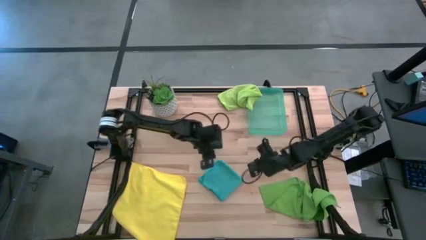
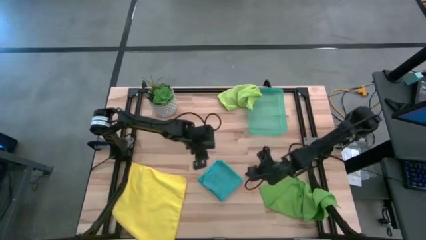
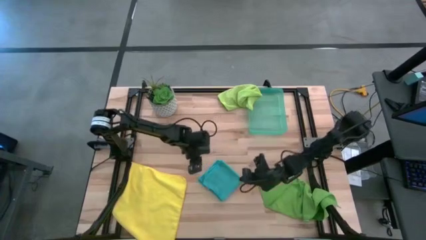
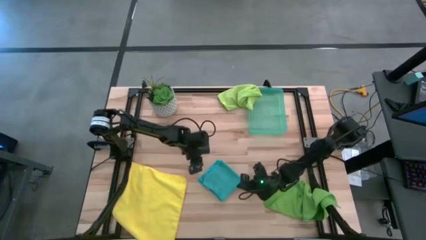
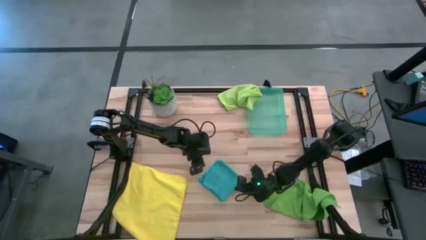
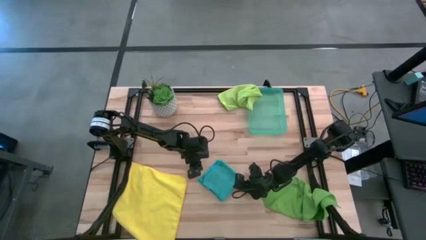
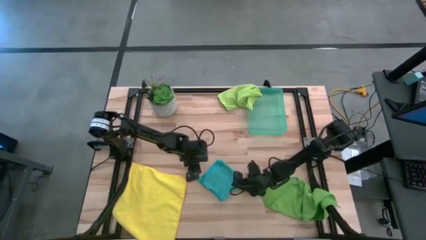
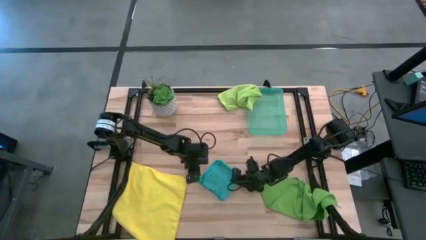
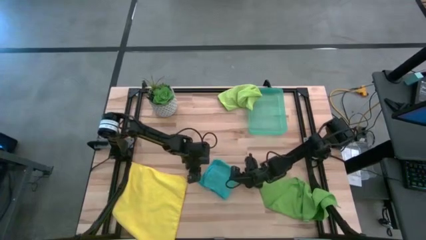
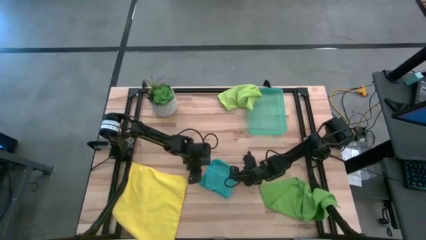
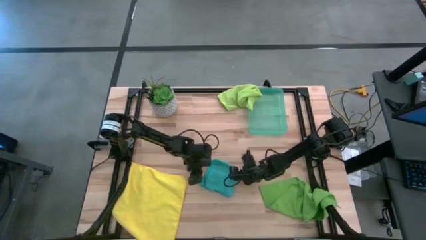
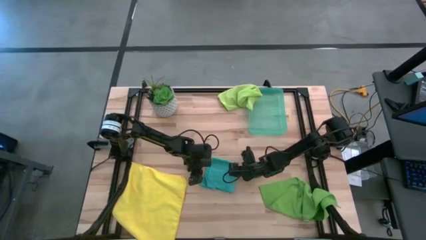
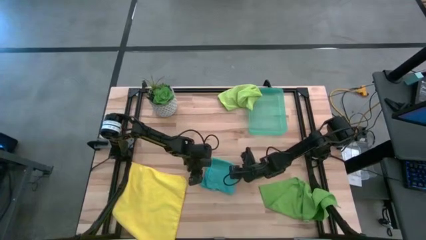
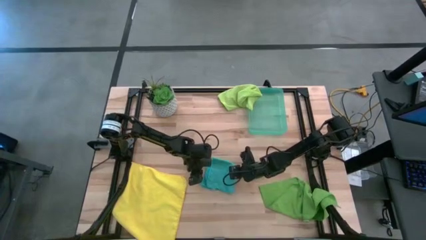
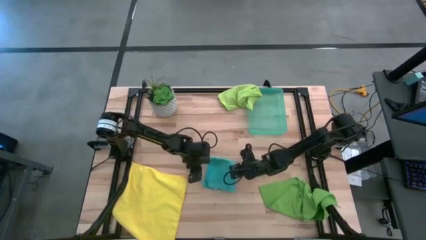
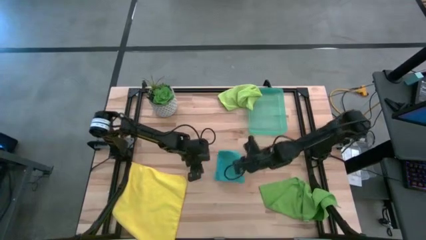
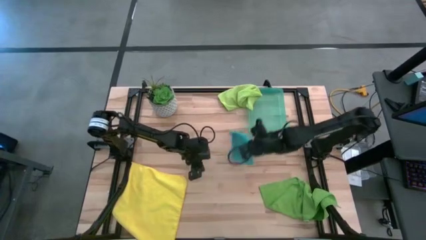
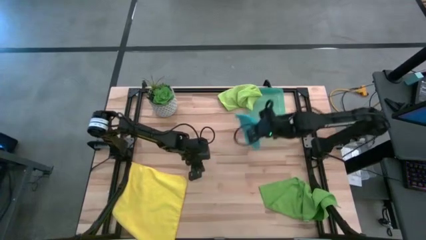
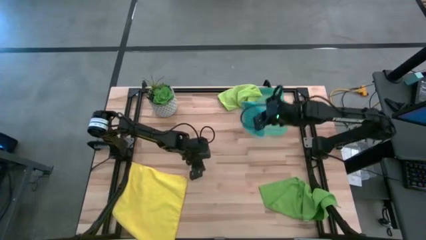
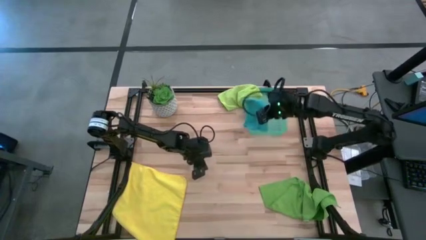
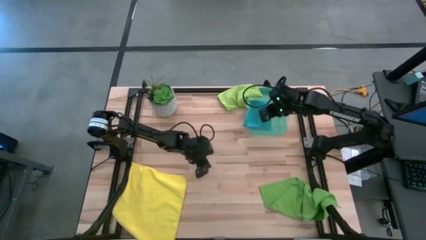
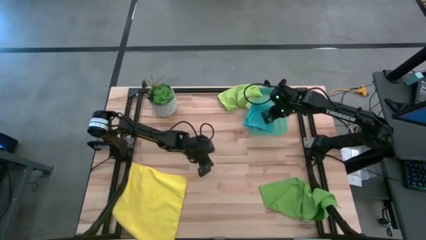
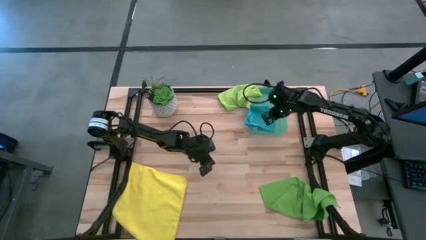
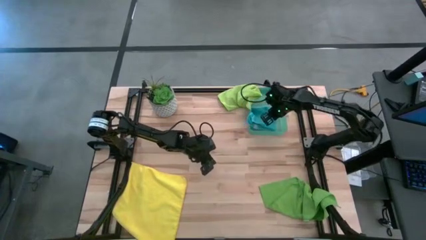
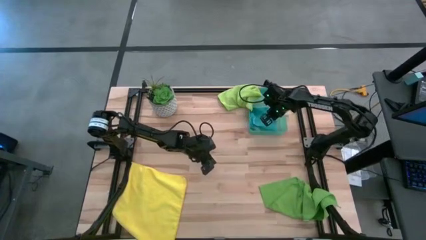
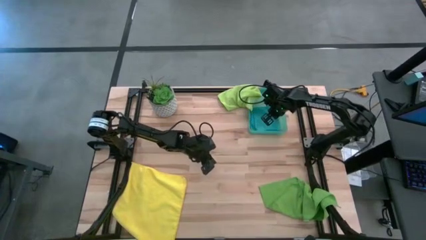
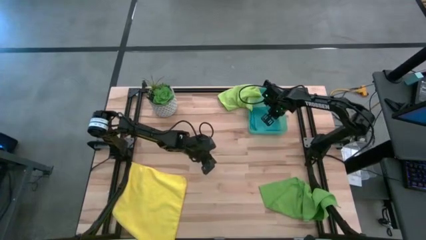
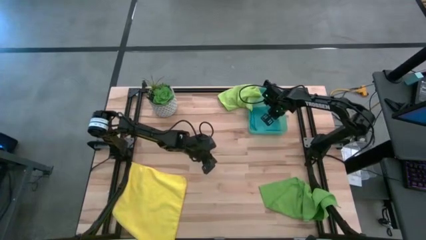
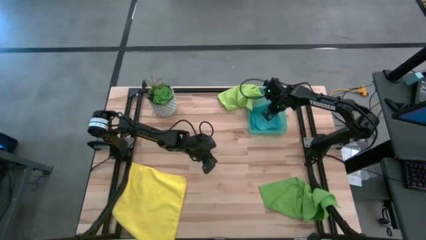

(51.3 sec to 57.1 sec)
Task: Fold microfiber towels
Put the blue towel into the container

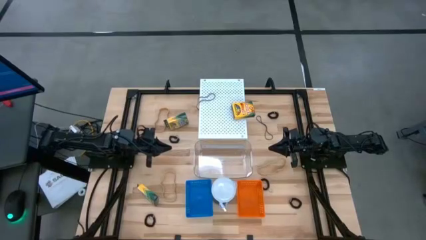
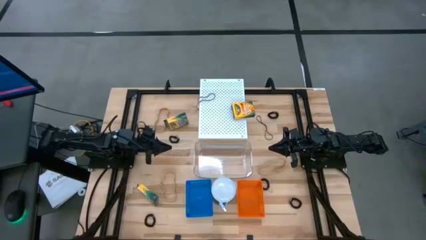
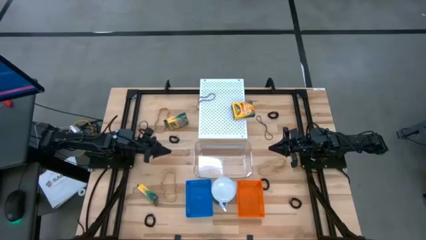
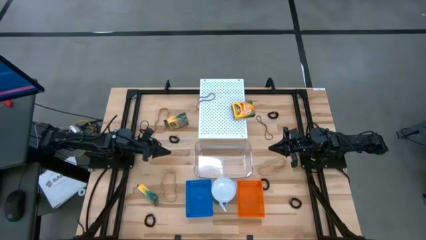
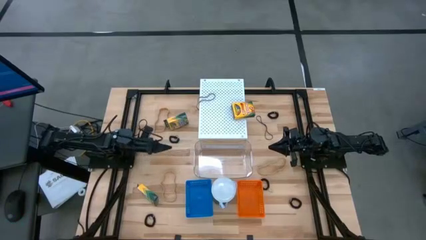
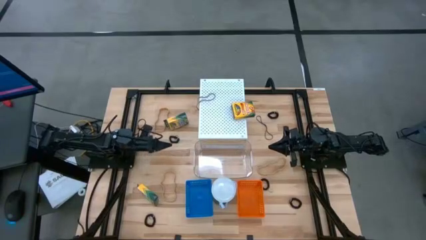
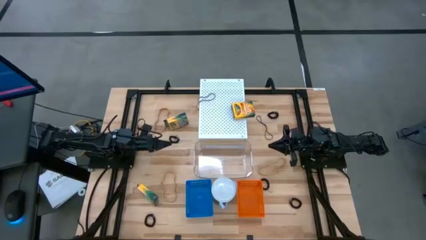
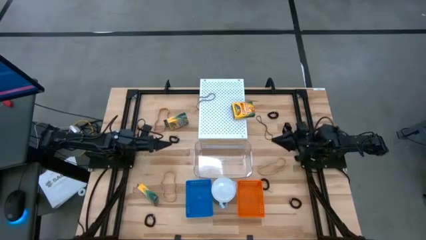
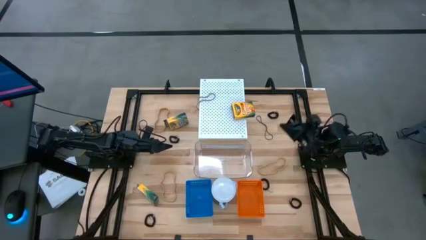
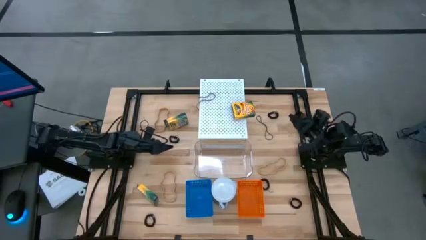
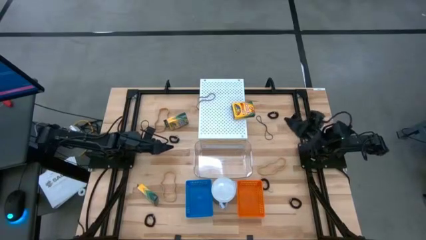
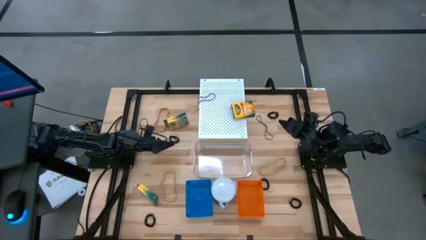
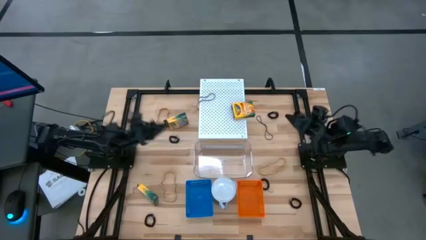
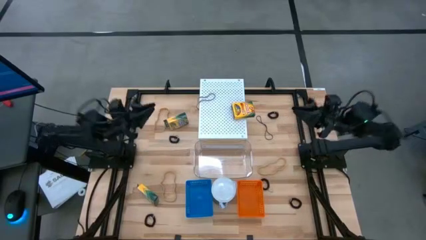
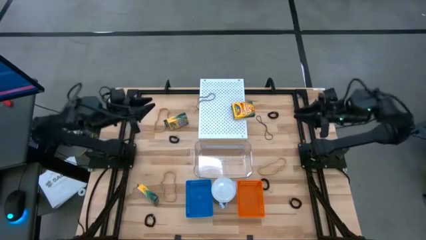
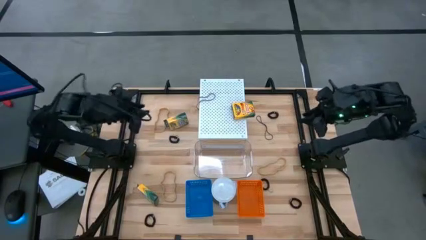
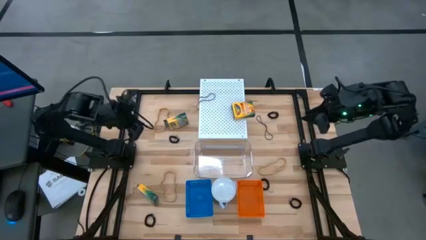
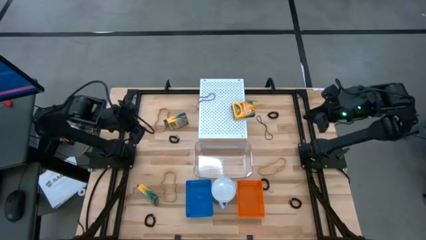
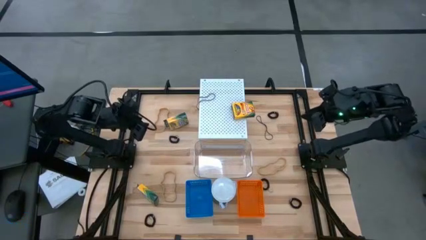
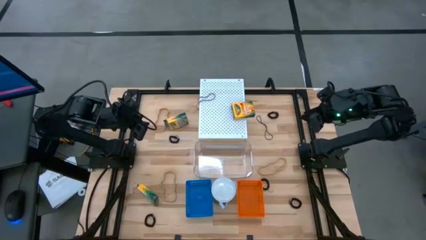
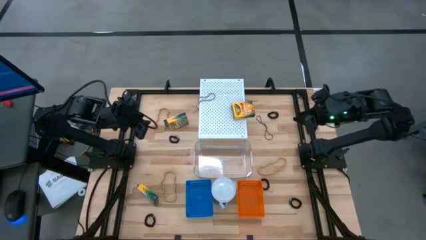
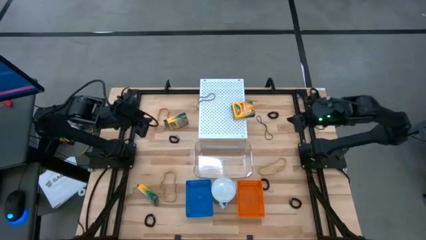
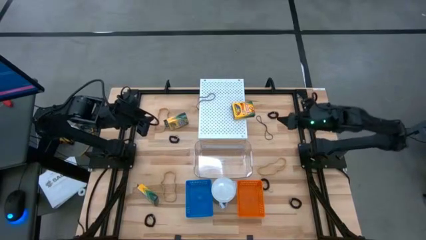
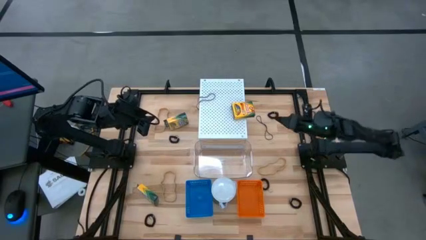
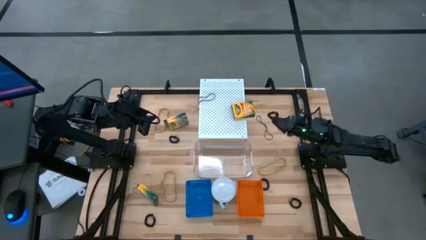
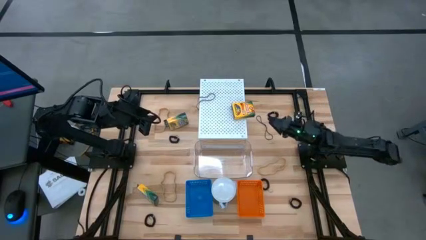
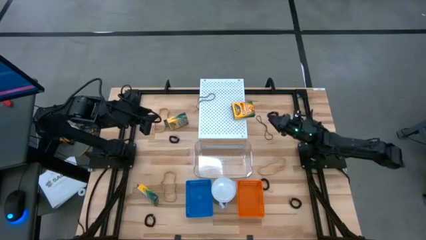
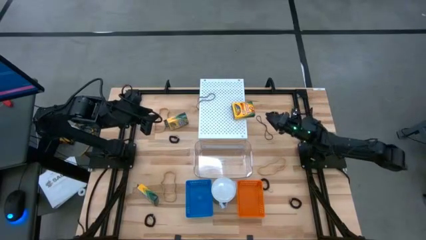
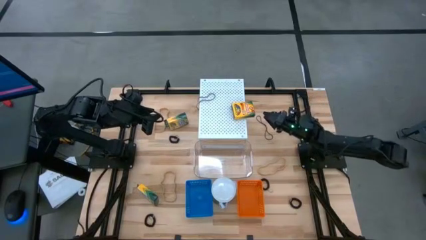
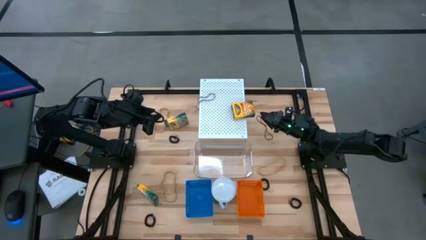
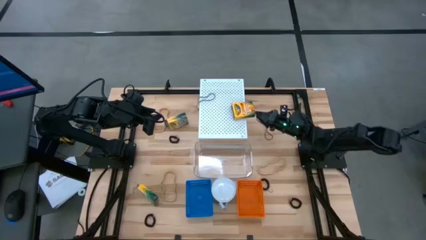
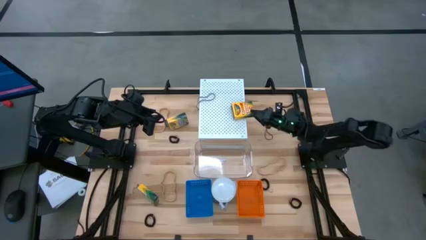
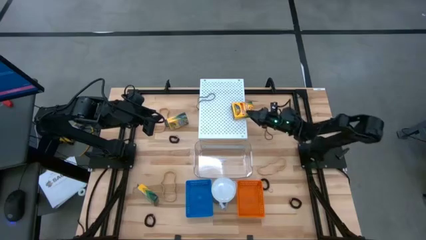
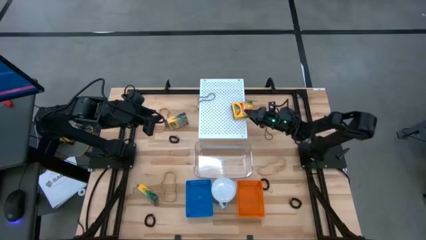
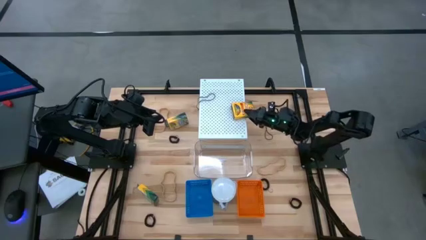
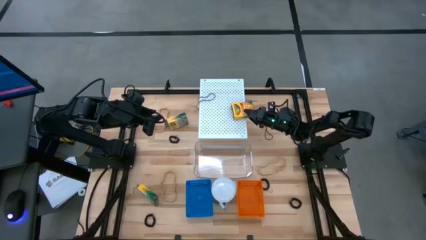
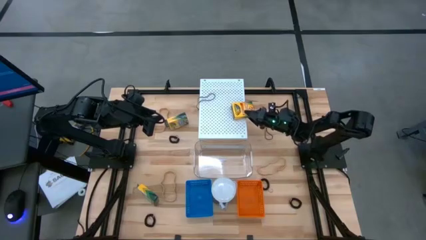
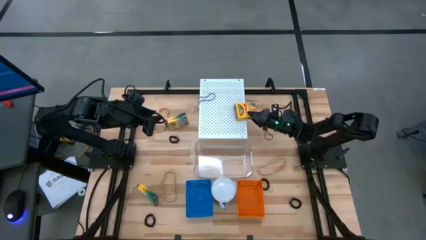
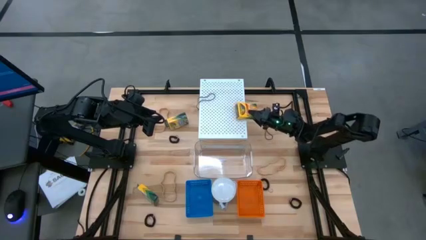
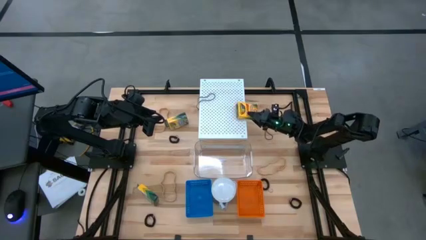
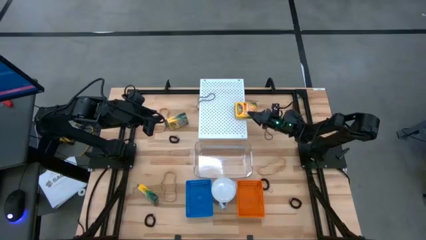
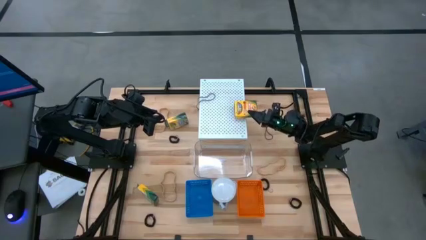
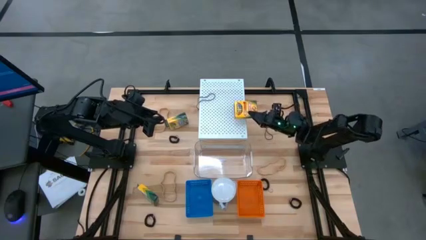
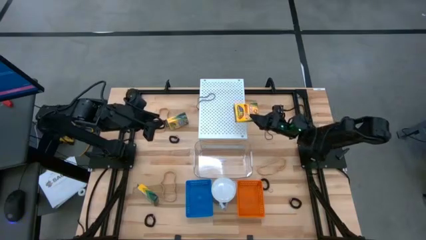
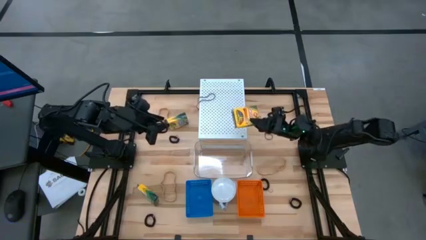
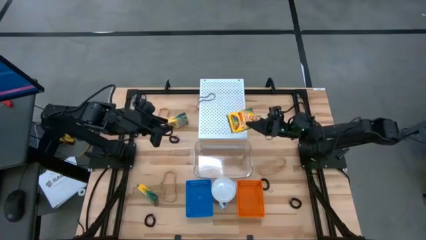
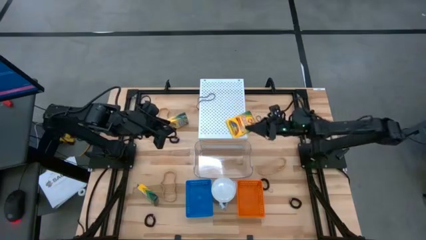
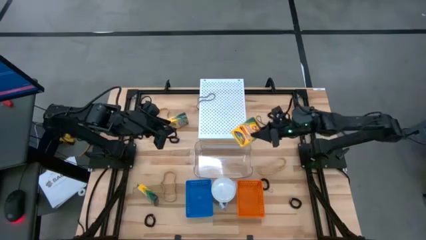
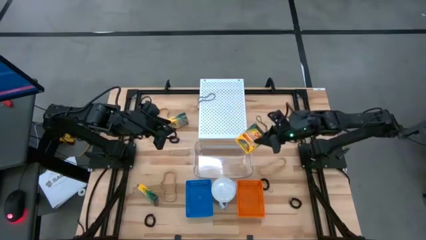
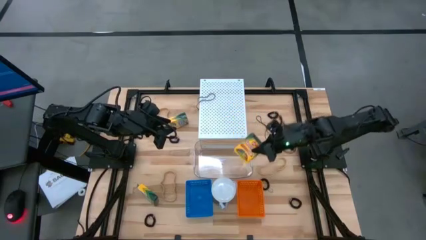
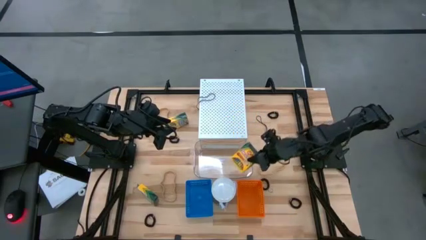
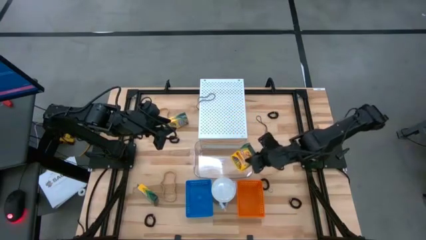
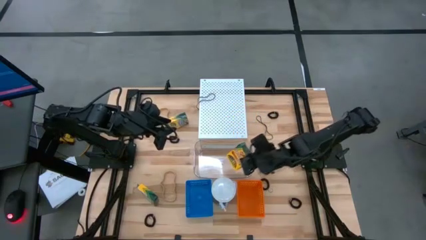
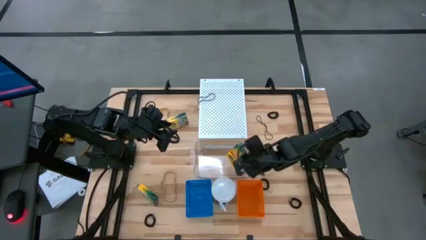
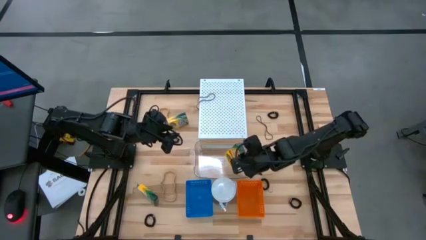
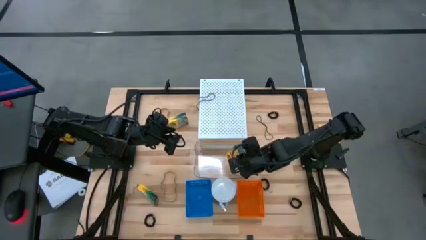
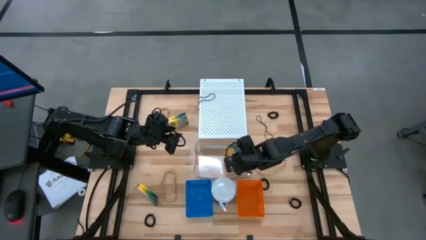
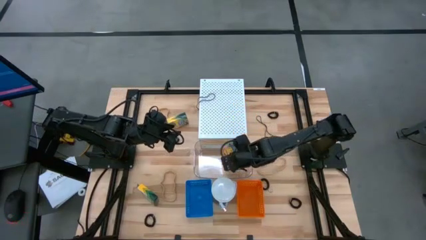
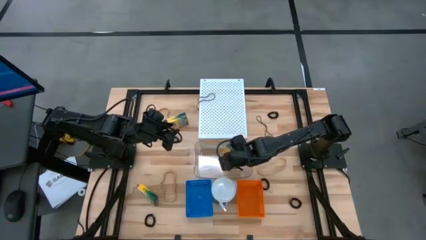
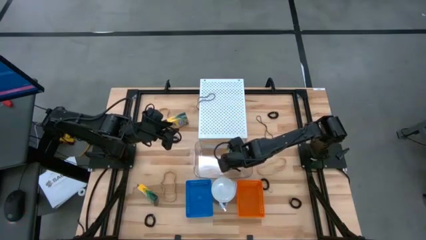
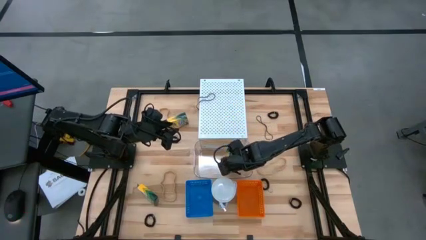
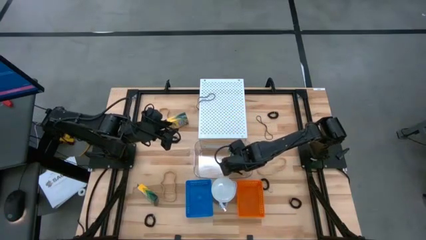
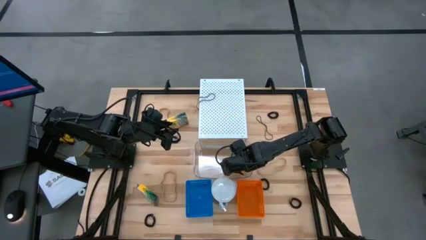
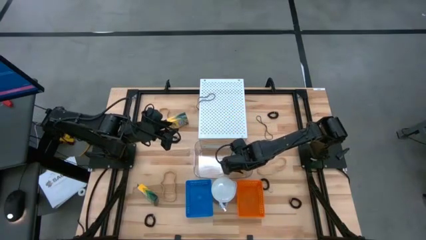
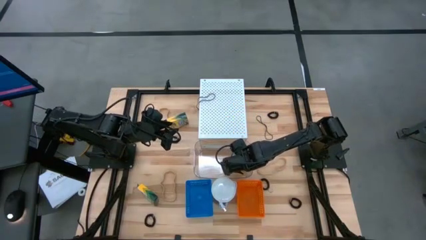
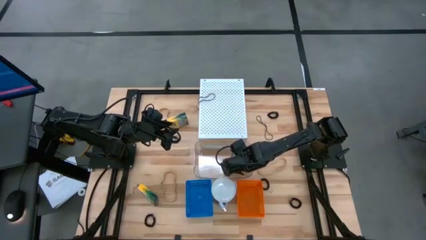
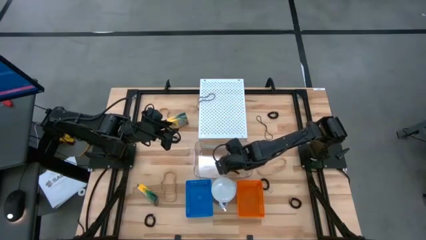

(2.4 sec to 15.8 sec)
Task: Pick & Place Office Desk Supplies
Put the crayon box into the transparent bin
